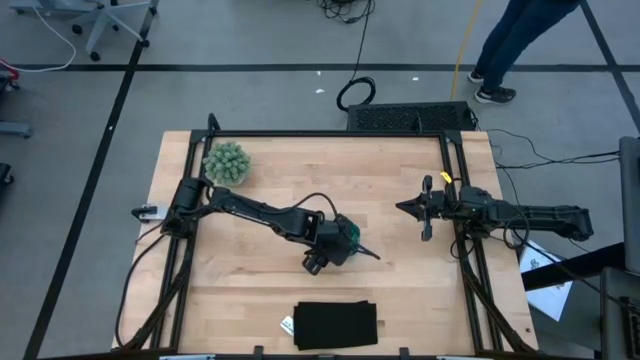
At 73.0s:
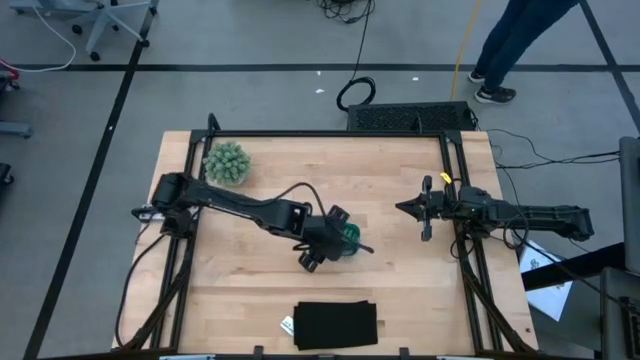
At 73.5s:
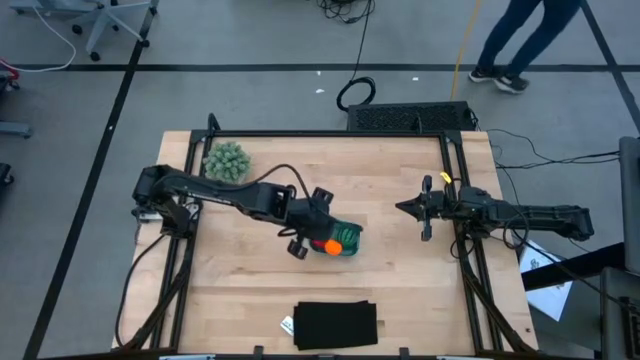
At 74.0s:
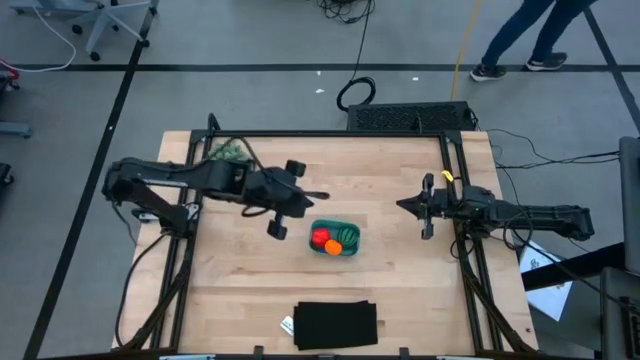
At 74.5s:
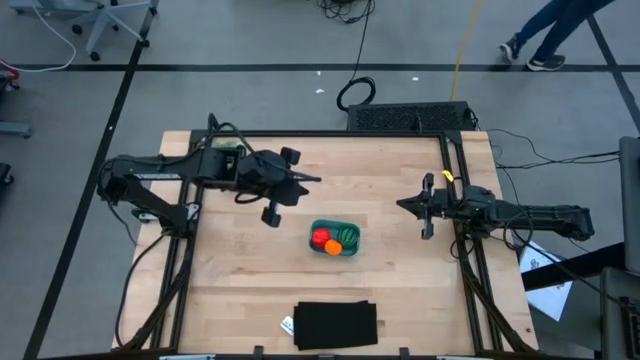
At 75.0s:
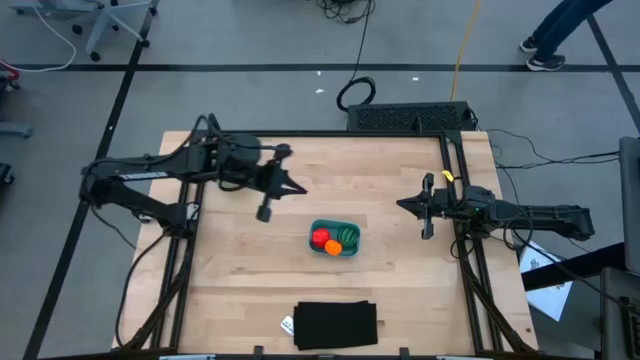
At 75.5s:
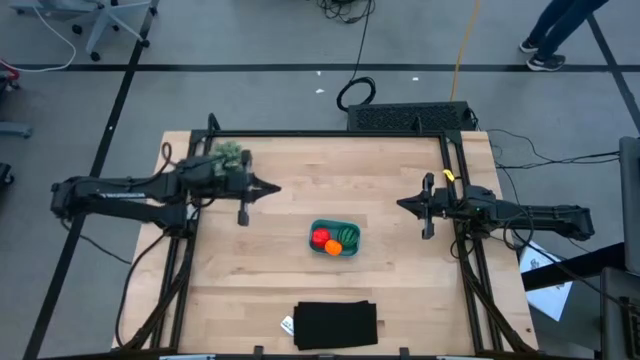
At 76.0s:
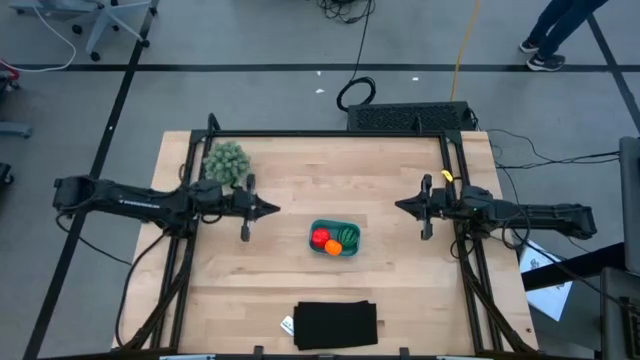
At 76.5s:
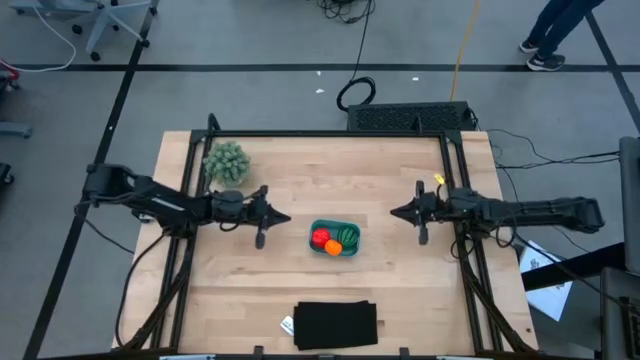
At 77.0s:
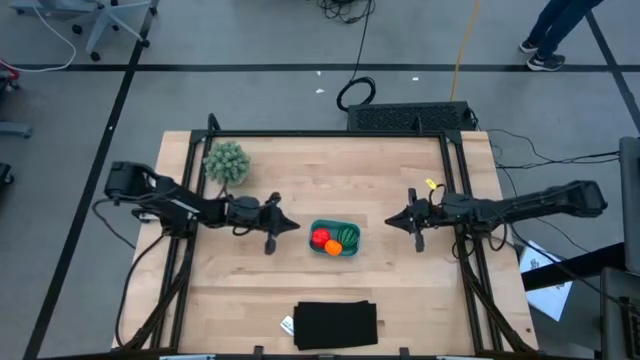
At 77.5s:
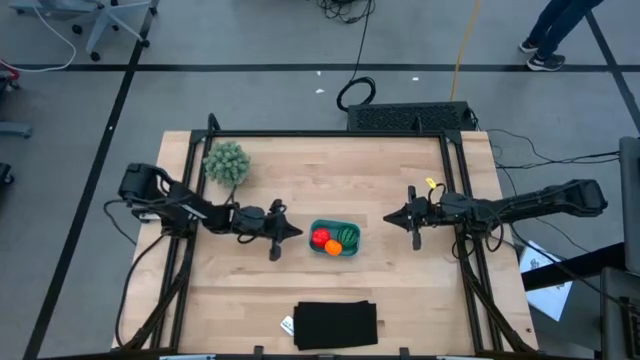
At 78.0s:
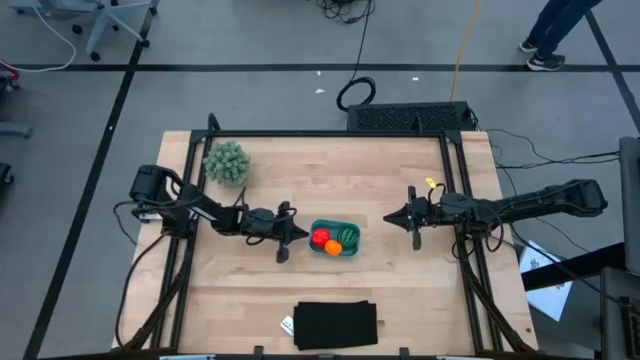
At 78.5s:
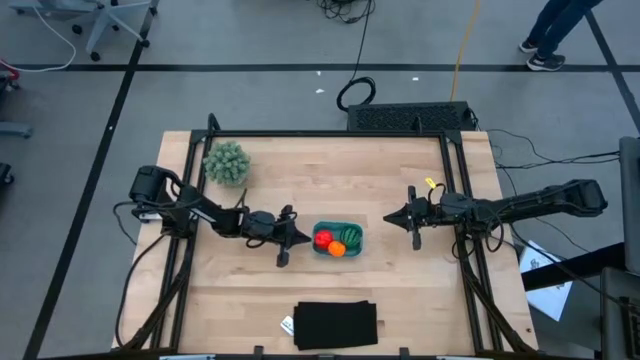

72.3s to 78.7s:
Task: Pick and placing Produce into tupperware
Adjust the bin

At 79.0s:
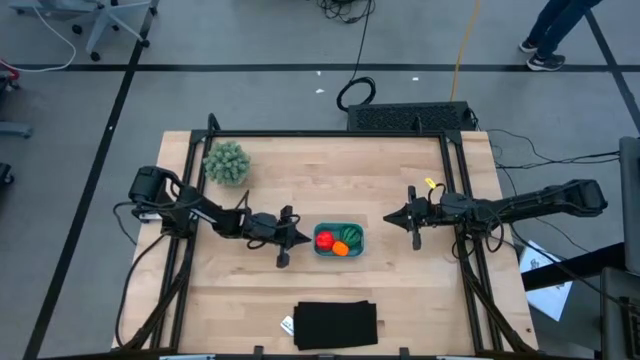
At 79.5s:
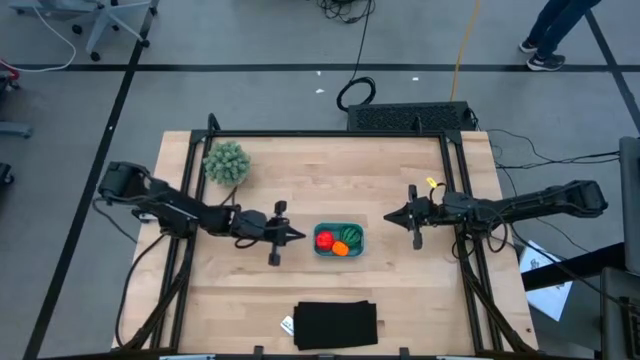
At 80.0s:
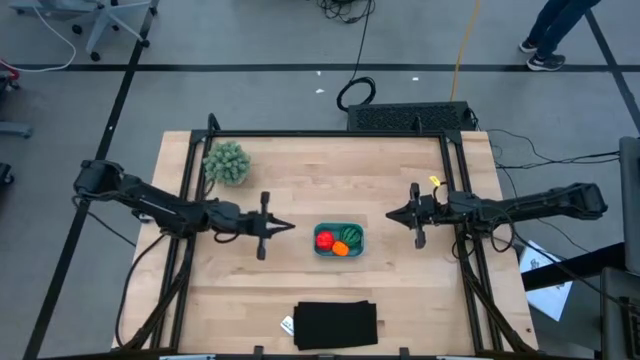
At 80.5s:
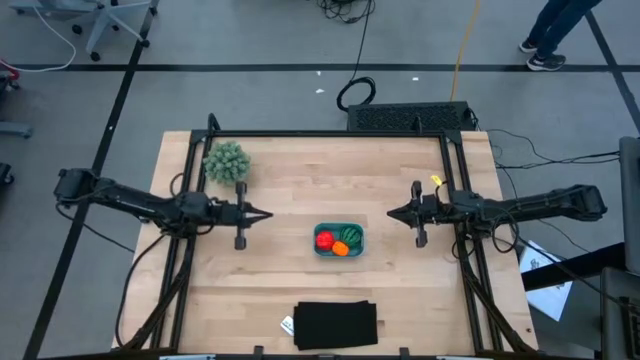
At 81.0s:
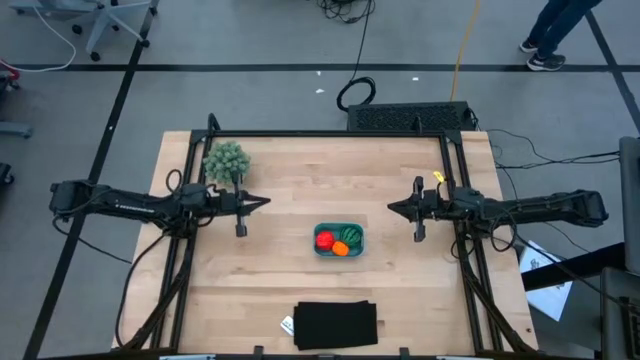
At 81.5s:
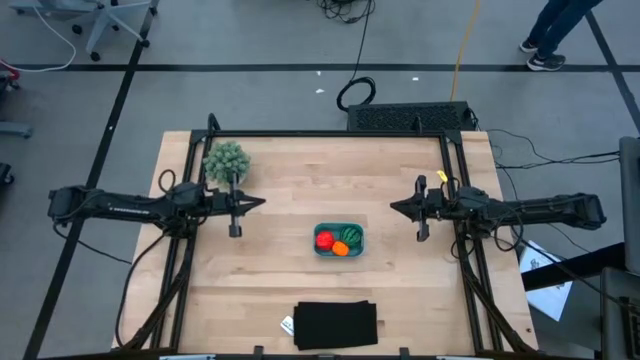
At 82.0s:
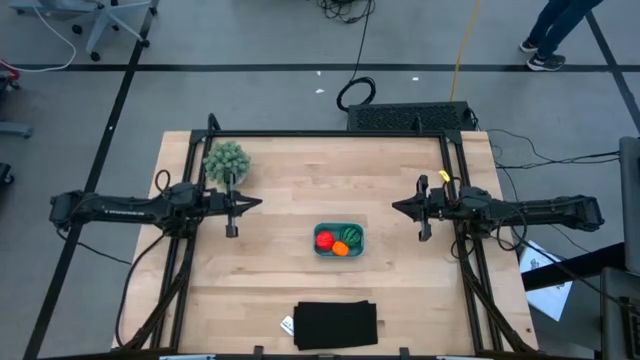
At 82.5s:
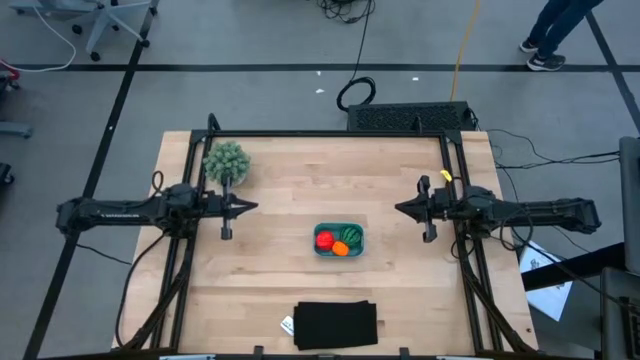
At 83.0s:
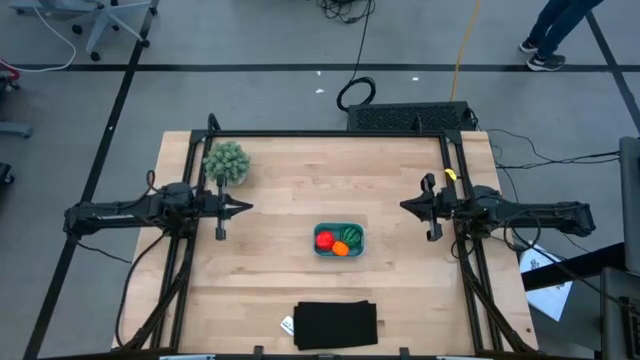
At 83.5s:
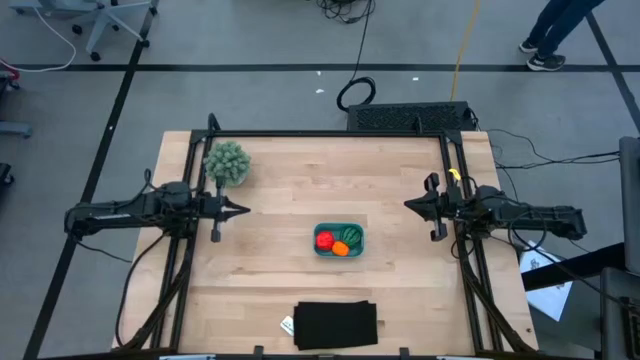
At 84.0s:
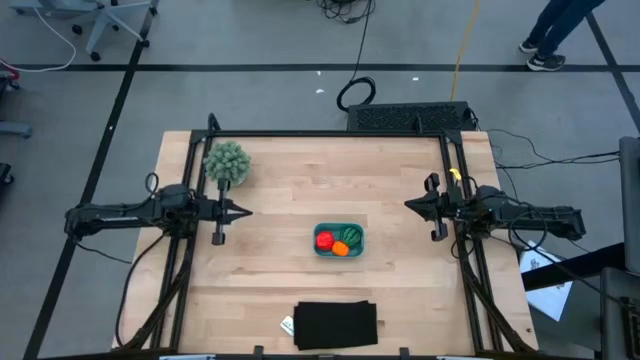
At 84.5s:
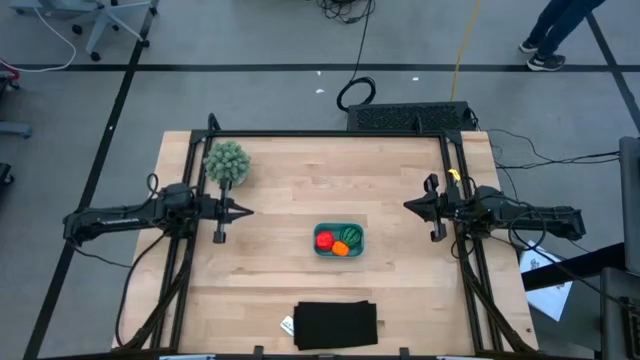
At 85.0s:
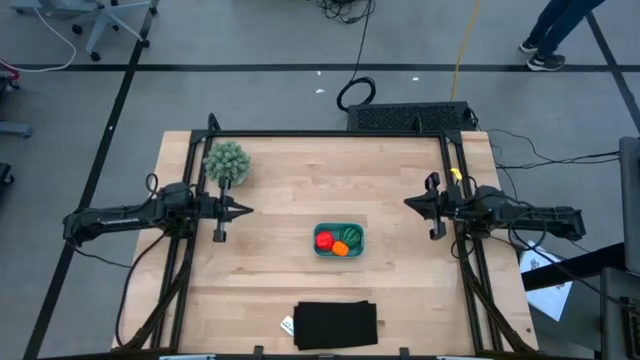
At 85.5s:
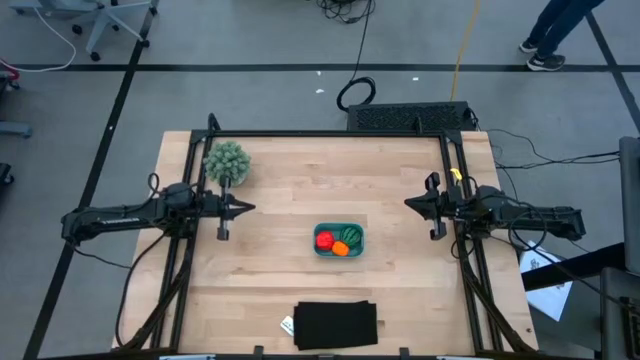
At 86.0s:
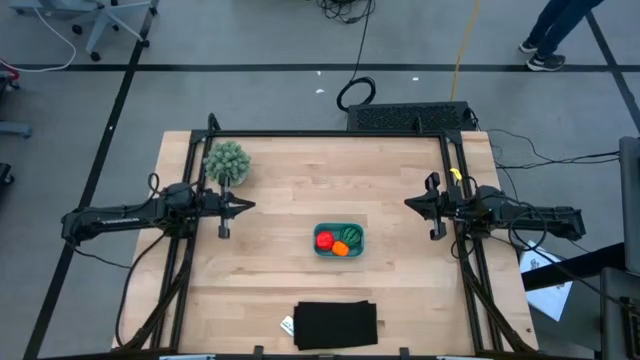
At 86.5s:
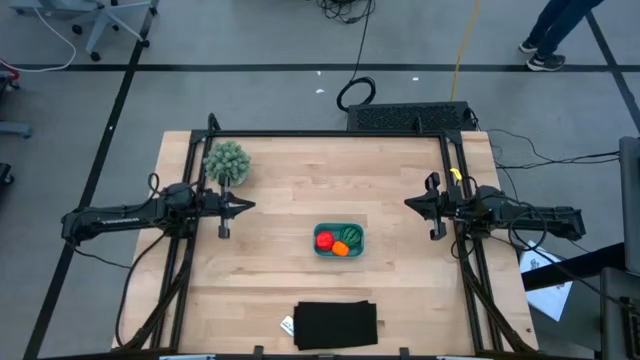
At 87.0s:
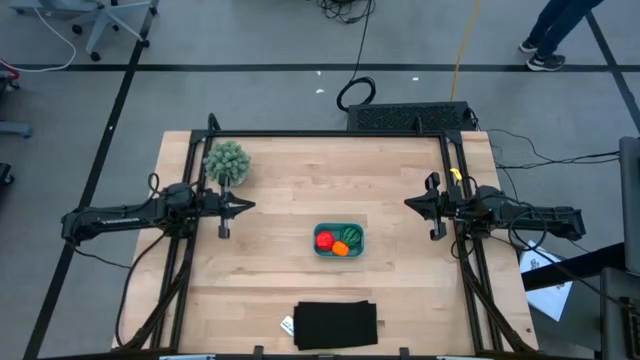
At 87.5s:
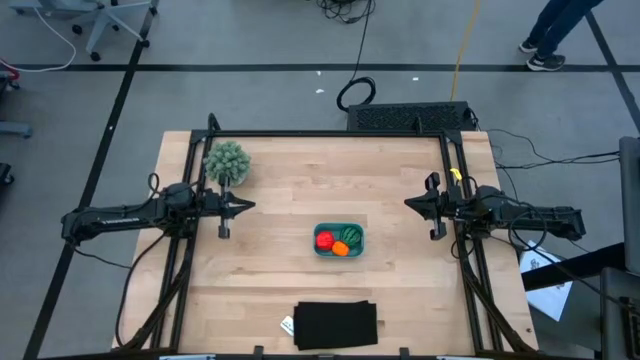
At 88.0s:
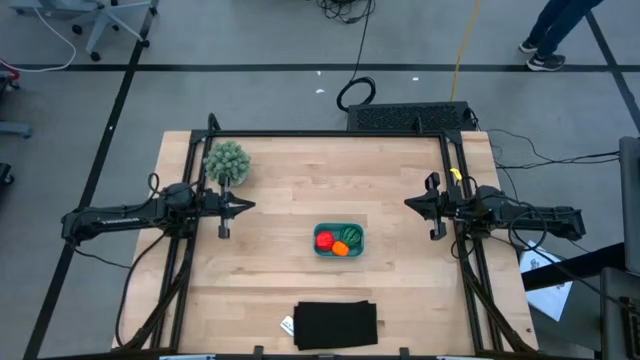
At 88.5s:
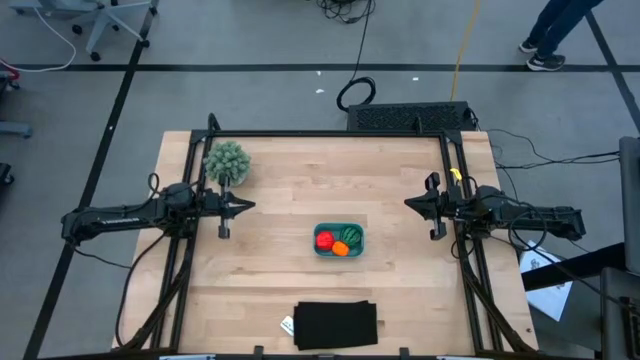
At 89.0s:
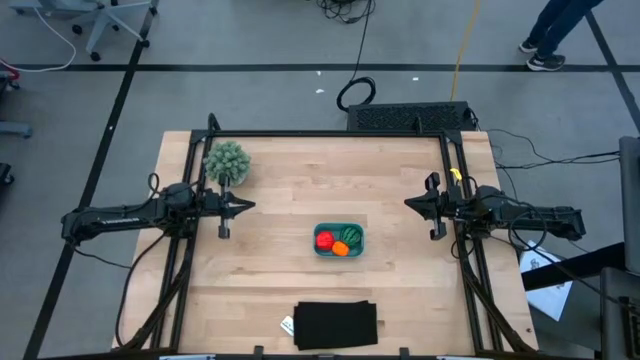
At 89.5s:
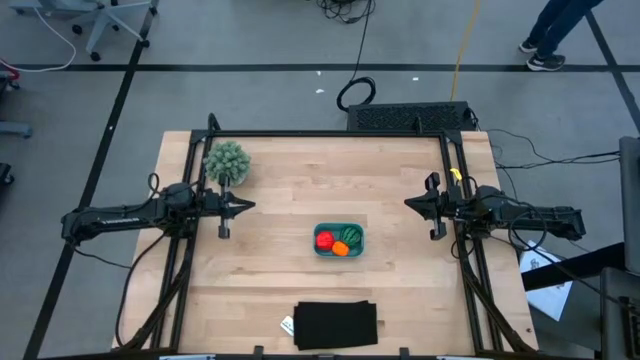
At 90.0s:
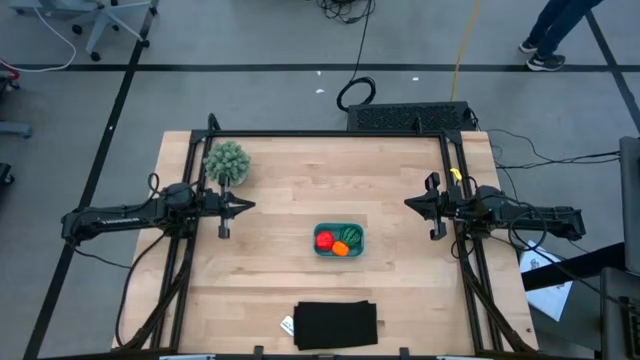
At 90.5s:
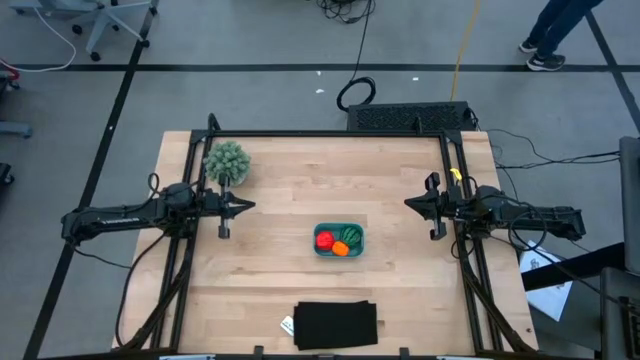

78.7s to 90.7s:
Return to Home Position

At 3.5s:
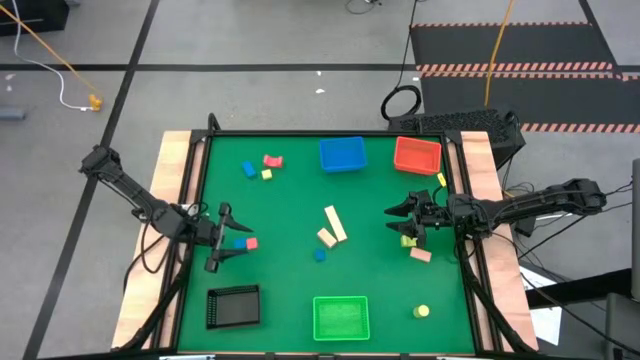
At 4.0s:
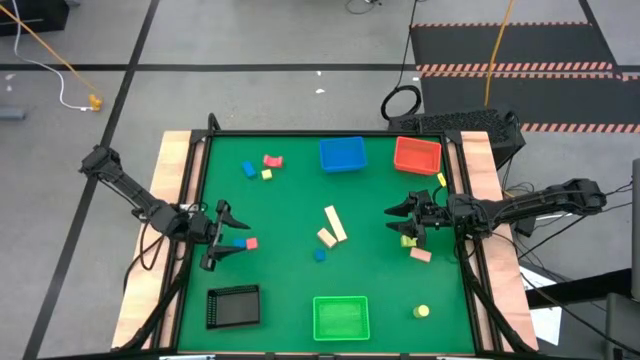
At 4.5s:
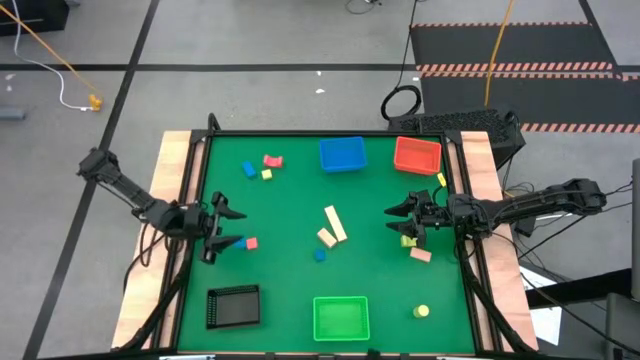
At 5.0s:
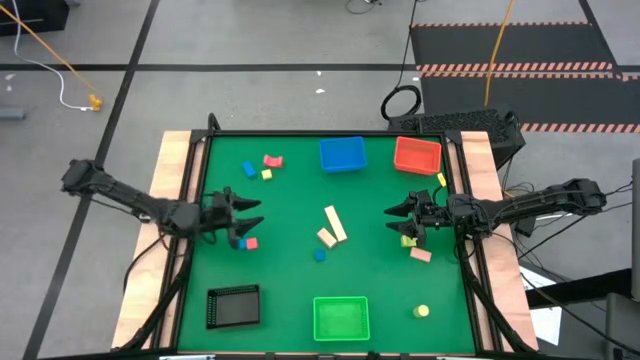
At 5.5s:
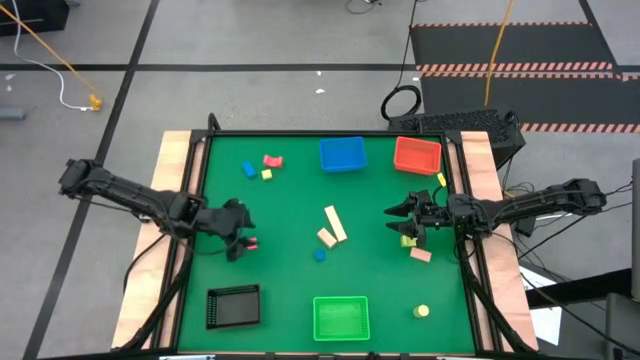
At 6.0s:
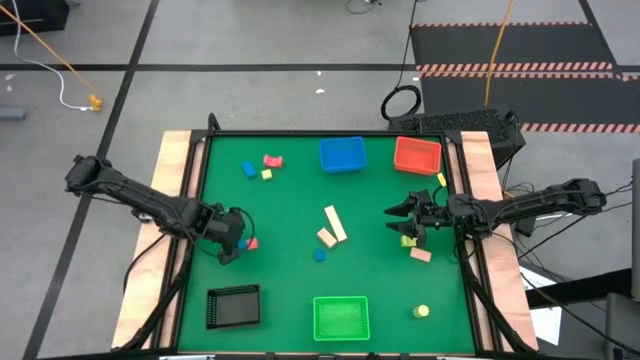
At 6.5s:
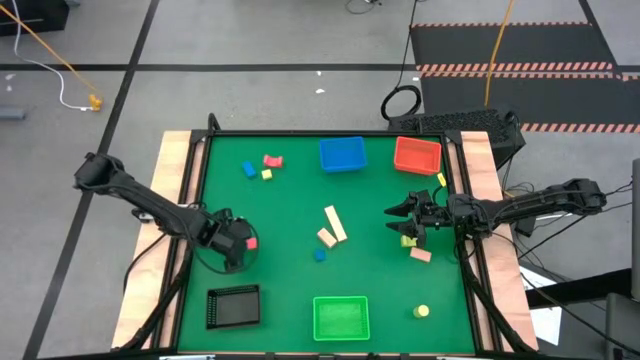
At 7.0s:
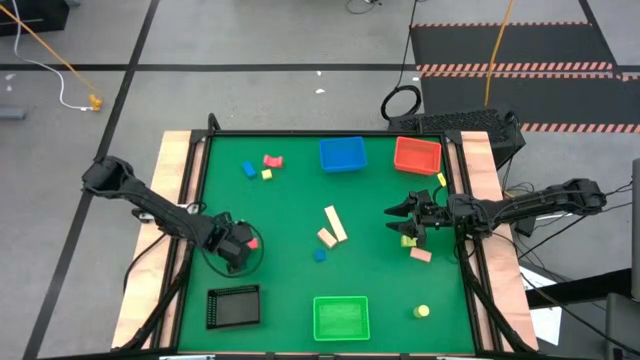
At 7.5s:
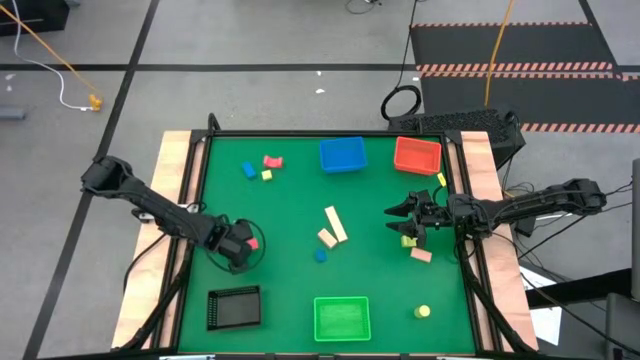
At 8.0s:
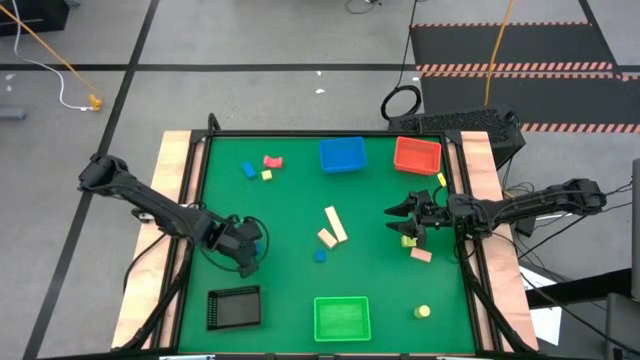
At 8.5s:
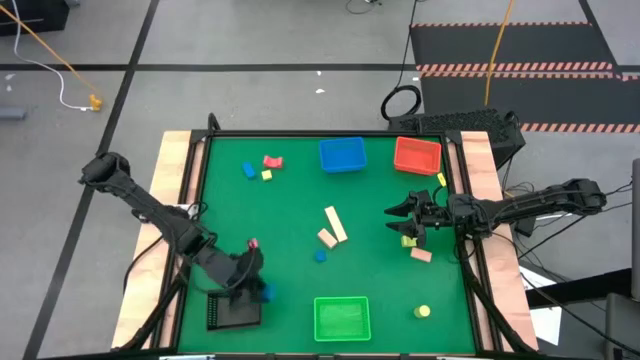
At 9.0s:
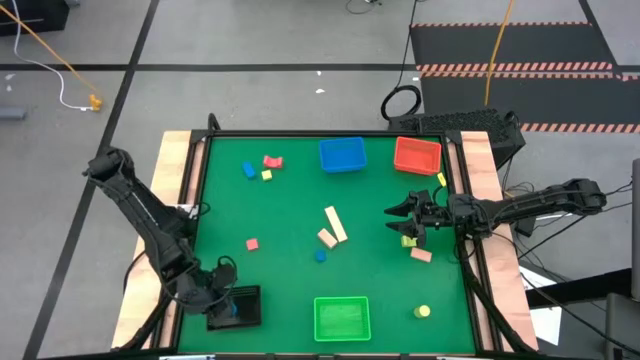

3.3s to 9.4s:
Task: Sort & place blocks by color
Put the blue block into the black bin
